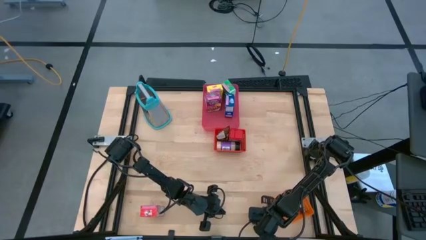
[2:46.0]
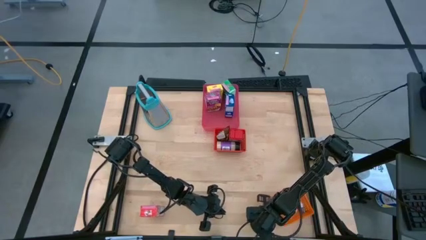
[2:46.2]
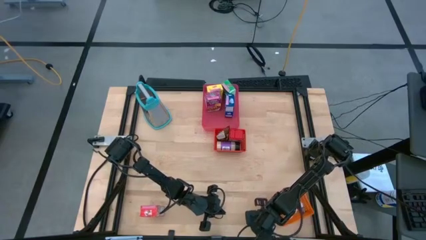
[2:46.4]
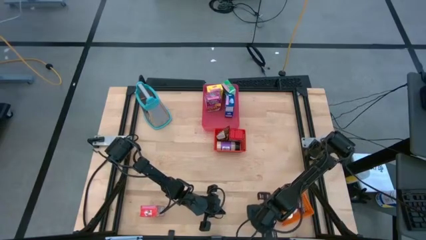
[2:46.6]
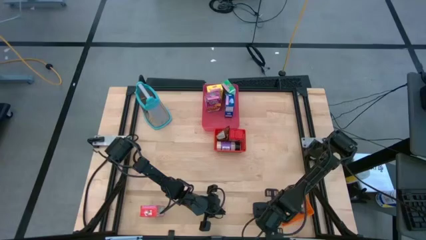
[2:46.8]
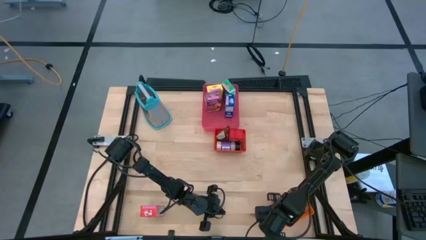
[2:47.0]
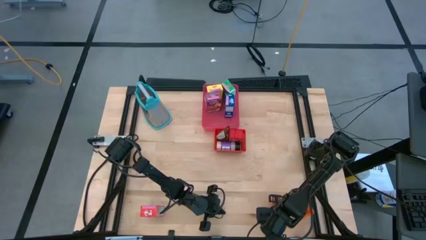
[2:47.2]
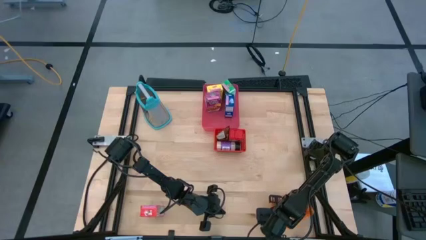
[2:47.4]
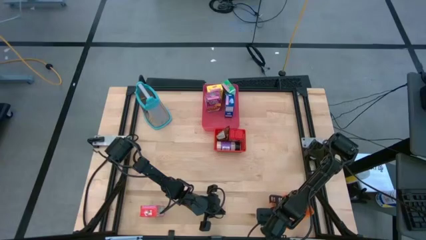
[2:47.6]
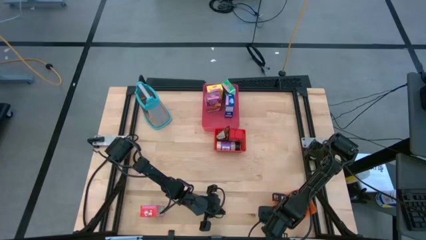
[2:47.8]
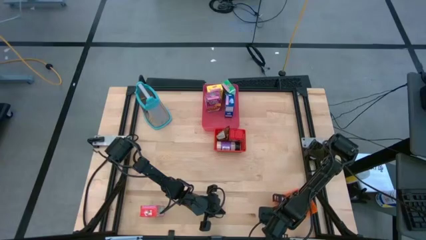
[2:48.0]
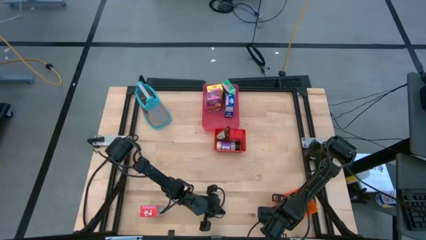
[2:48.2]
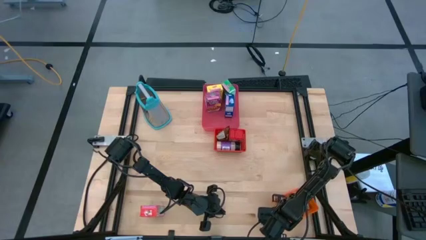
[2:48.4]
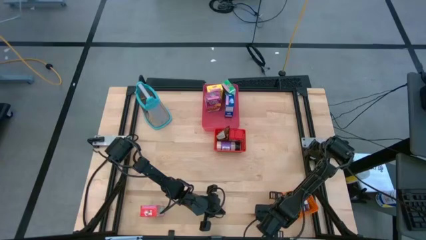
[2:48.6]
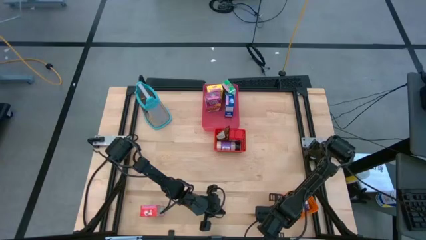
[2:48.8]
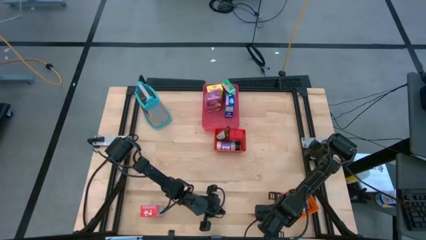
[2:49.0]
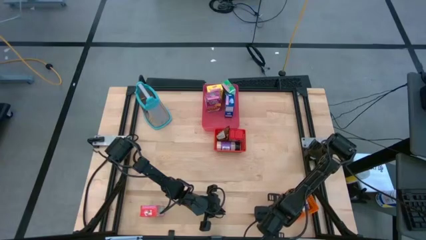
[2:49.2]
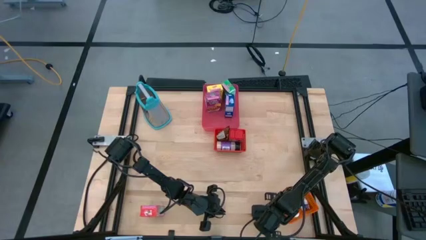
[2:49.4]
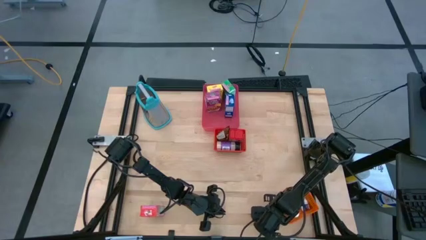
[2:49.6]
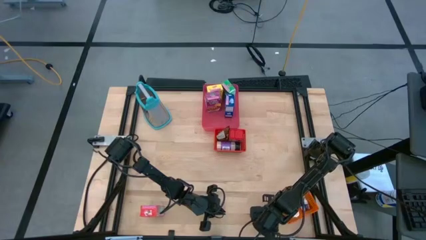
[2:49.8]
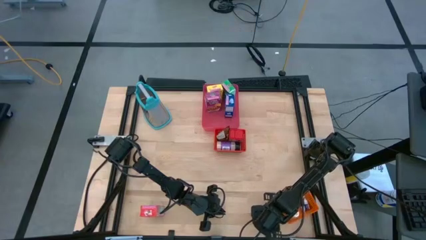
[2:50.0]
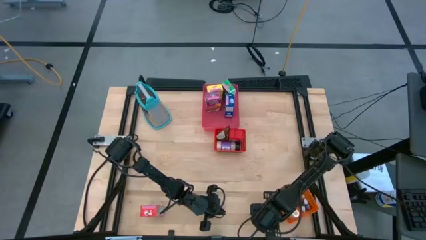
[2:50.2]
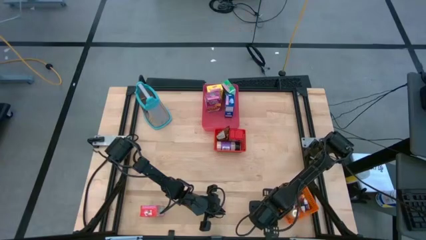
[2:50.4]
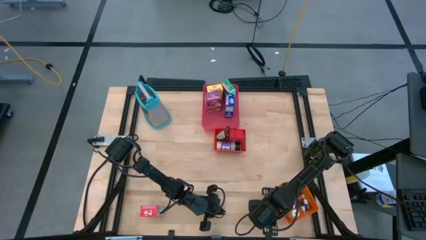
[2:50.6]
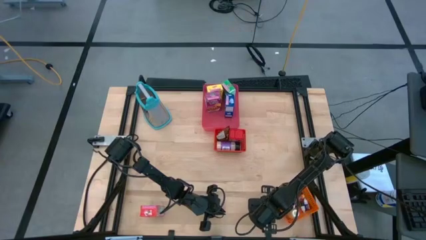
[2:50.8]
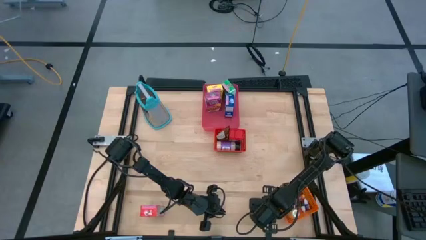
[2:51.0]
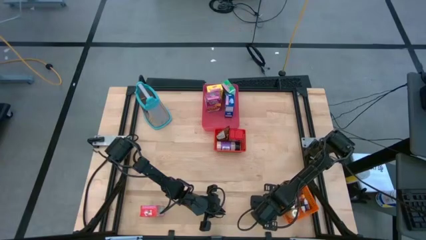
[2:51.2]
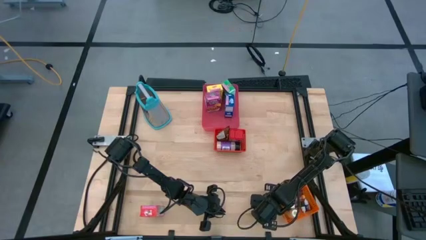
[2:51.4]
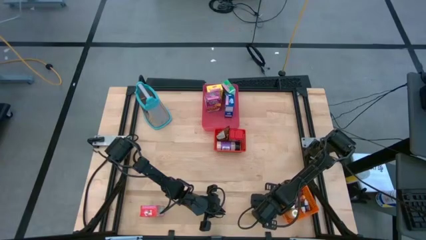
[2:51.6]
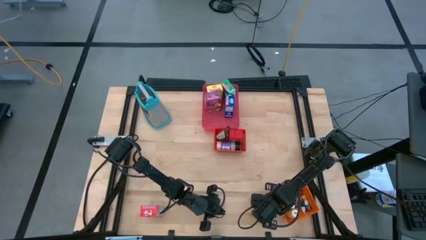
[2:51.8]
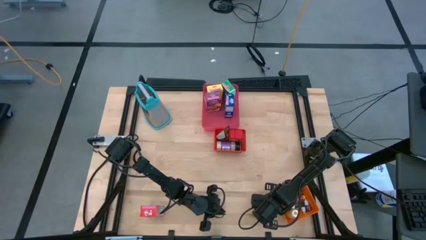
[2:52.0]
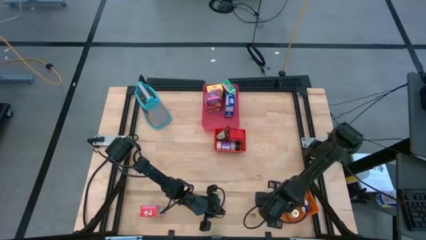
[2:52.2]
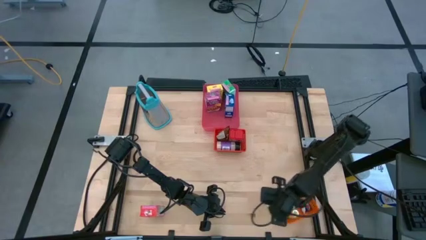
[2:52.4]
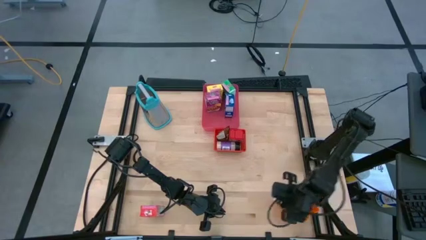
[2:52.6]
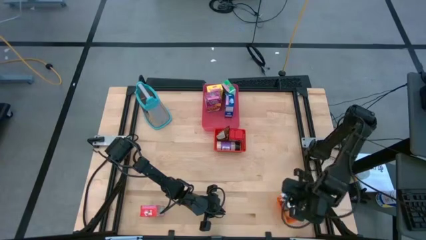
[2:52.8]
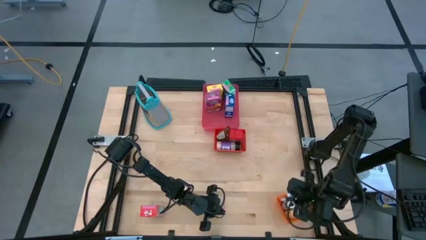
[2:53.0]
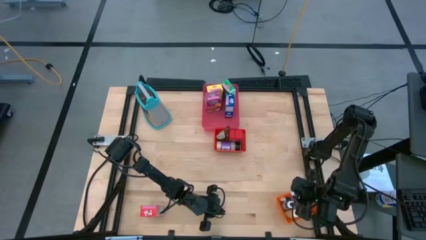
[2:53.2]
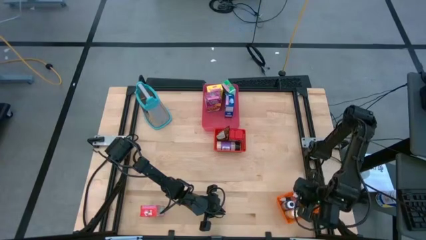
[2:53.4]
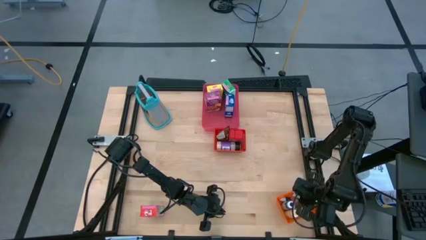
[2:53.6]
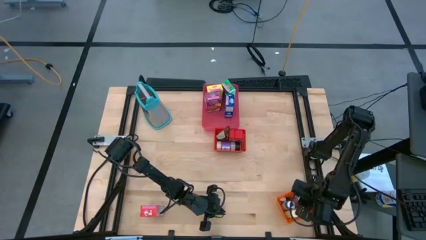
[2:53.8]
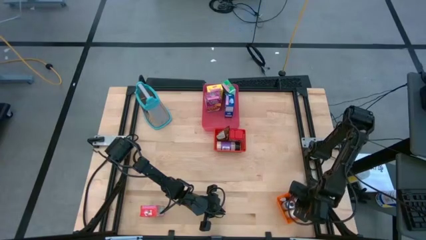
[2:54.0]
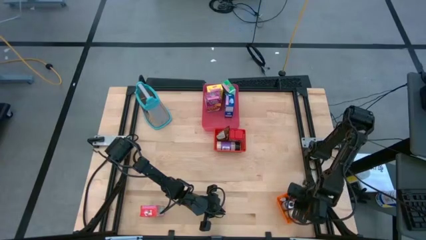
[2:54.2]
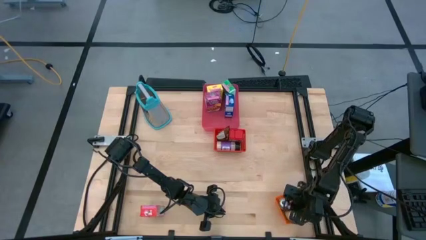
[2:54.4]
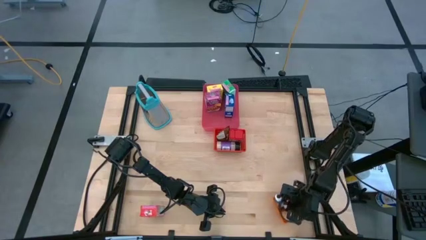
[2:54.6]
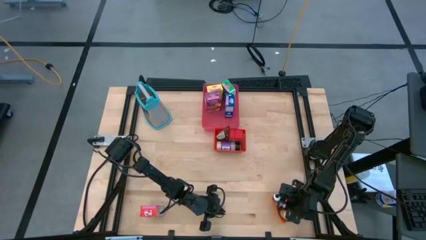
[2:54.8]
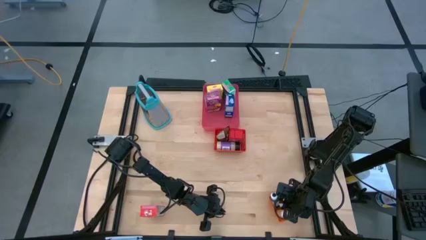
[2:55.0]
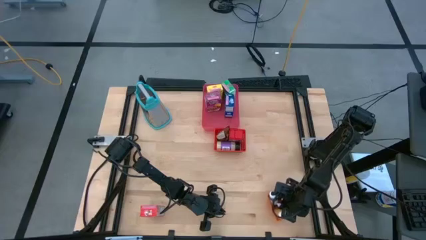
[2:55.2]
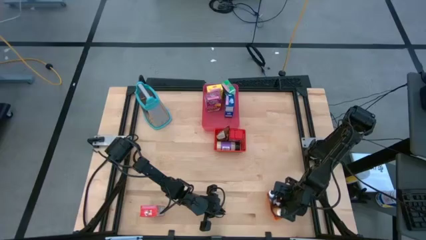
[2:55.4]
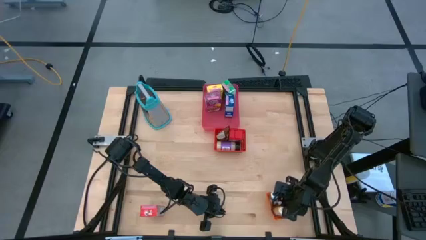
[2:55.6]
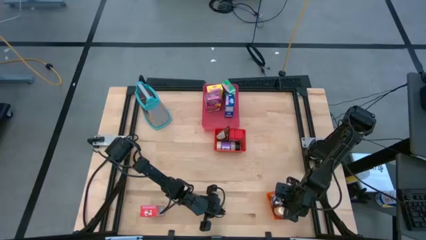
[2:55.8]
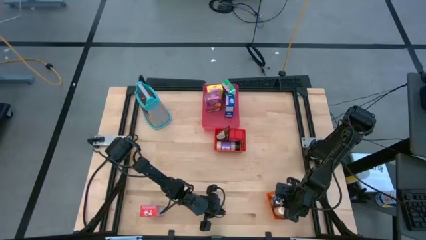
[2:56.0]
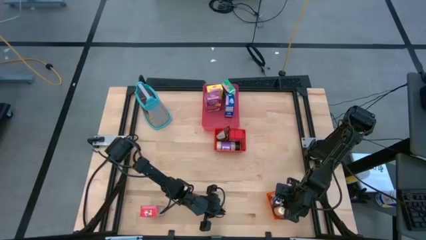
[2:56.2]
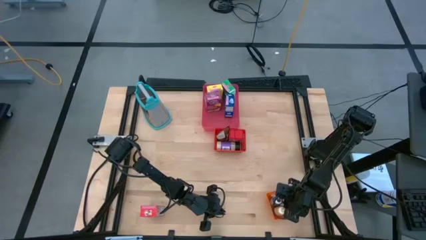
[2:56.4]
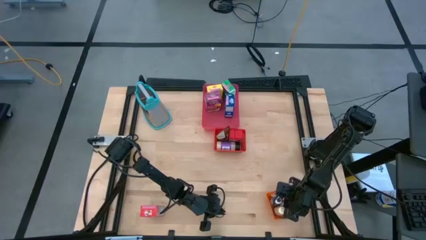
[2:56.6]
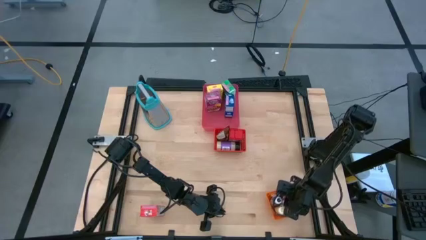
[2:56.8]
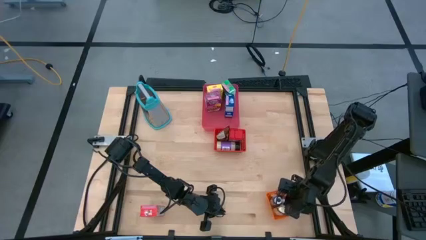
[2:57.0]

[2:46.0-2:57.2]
Task: Pick & Place Kitchen Items
Put the red food coloring bottle into the orange bin
